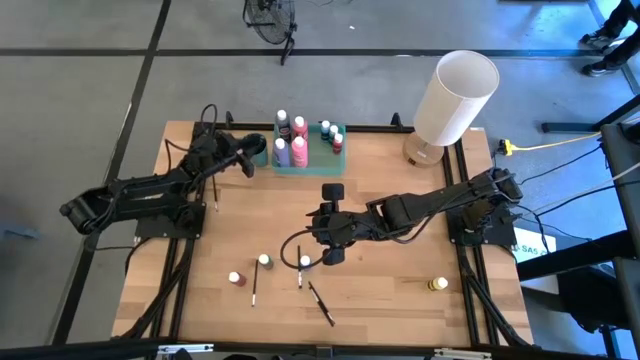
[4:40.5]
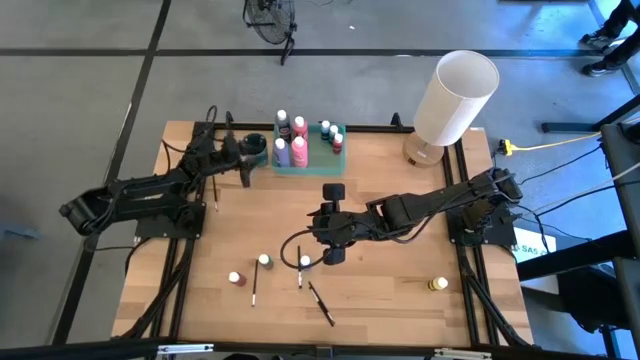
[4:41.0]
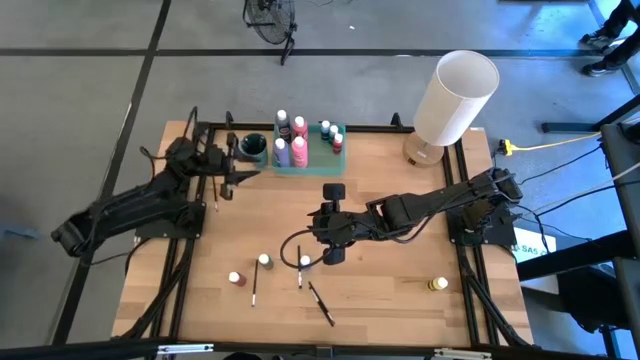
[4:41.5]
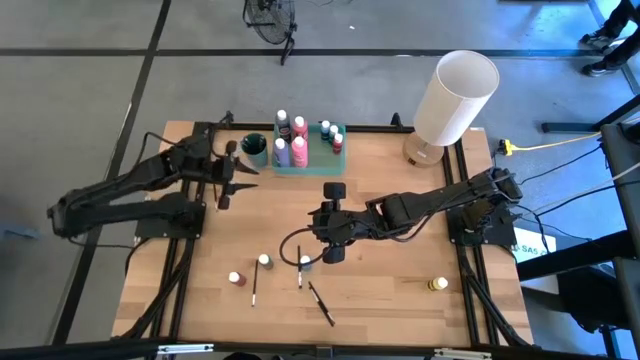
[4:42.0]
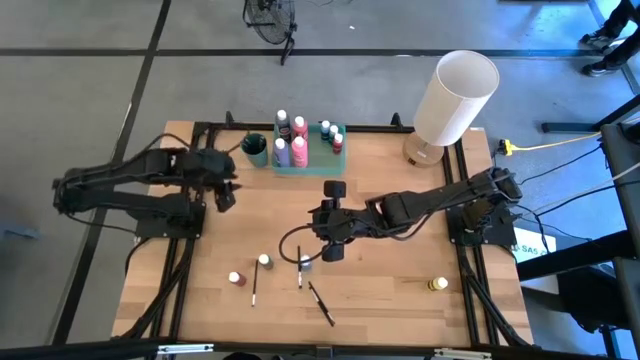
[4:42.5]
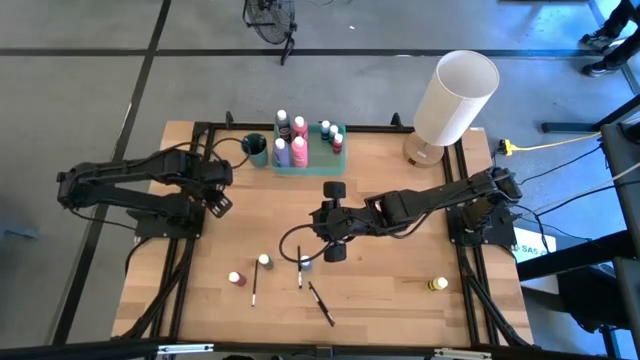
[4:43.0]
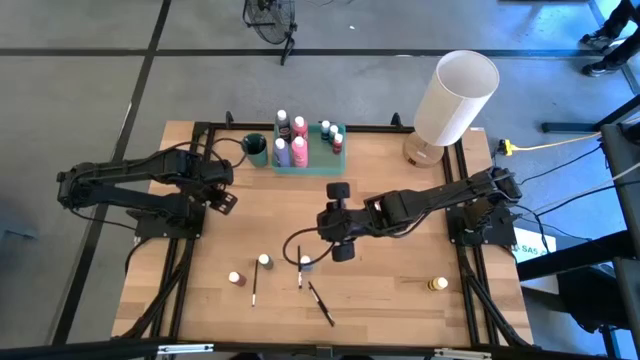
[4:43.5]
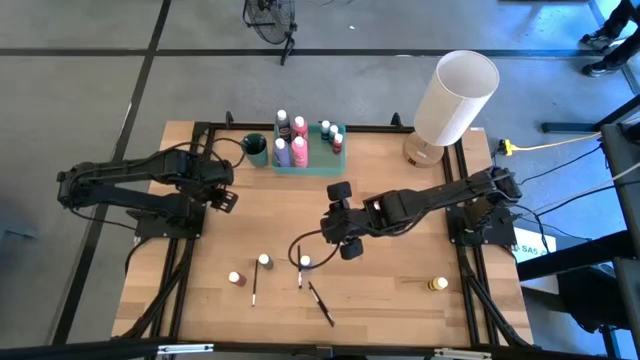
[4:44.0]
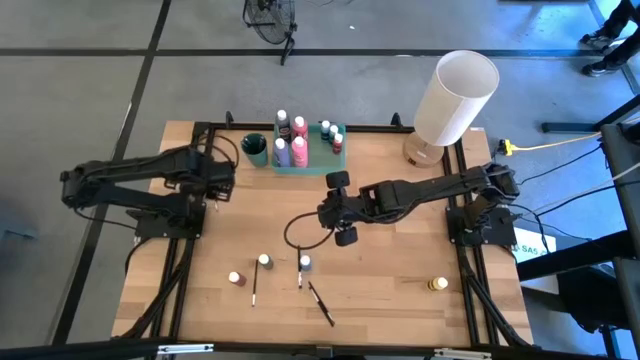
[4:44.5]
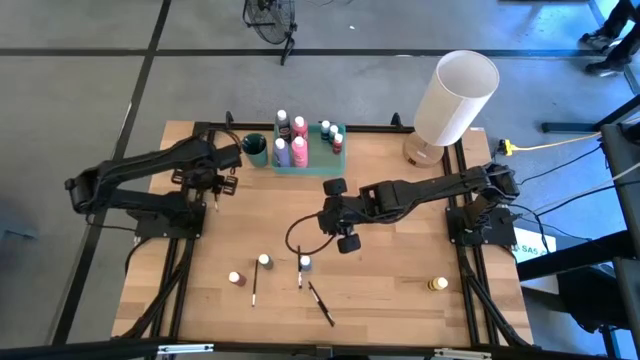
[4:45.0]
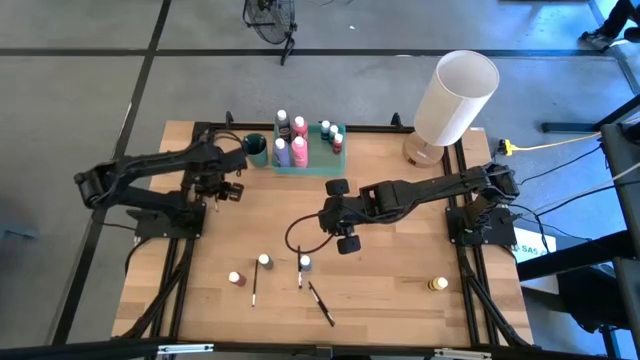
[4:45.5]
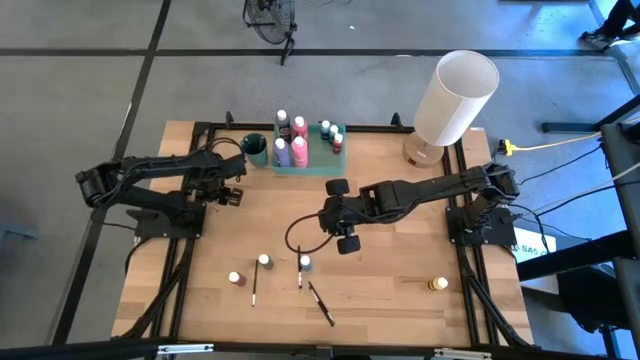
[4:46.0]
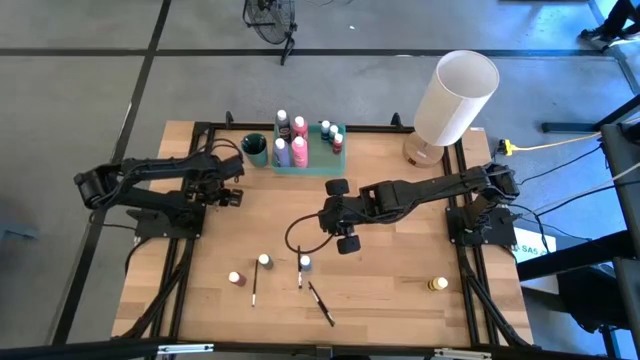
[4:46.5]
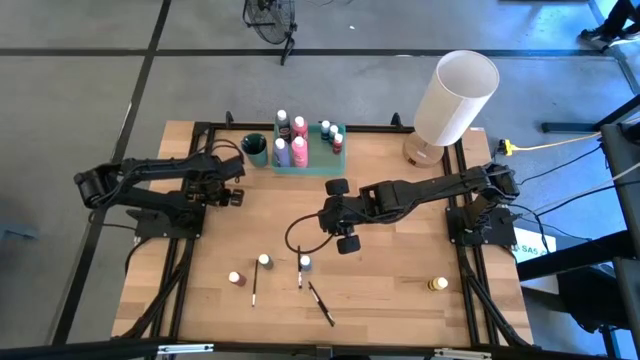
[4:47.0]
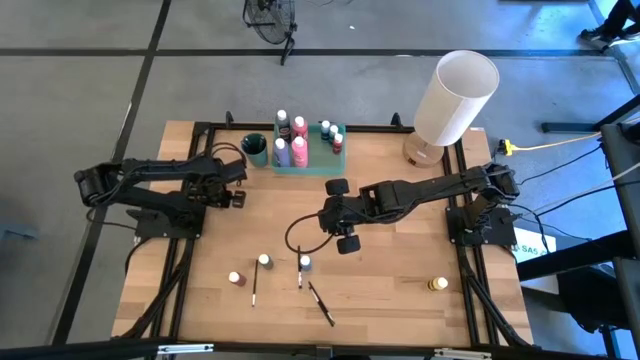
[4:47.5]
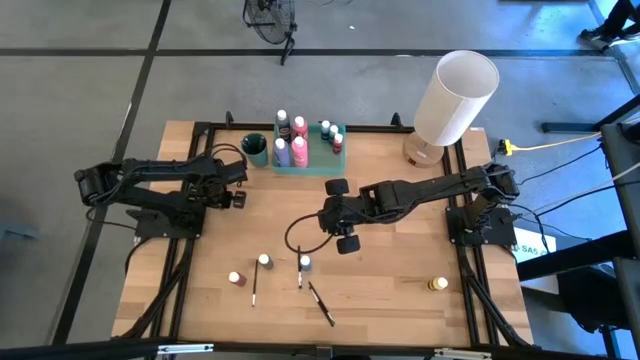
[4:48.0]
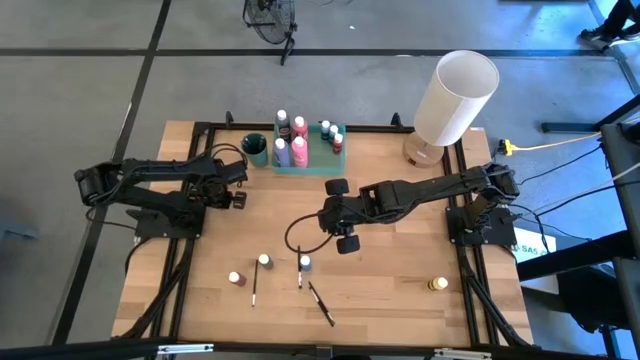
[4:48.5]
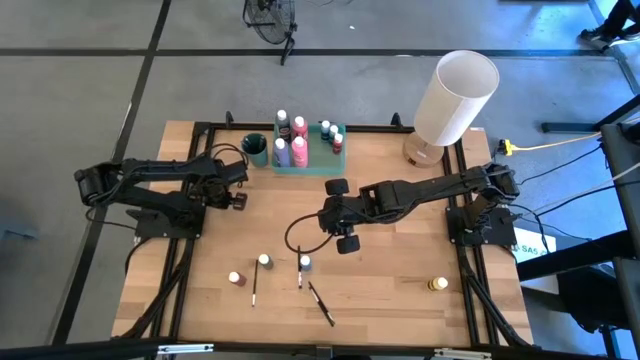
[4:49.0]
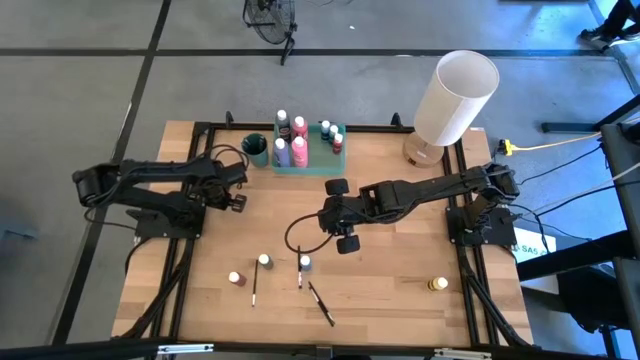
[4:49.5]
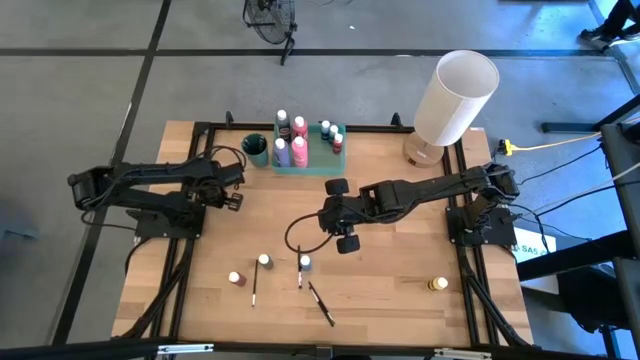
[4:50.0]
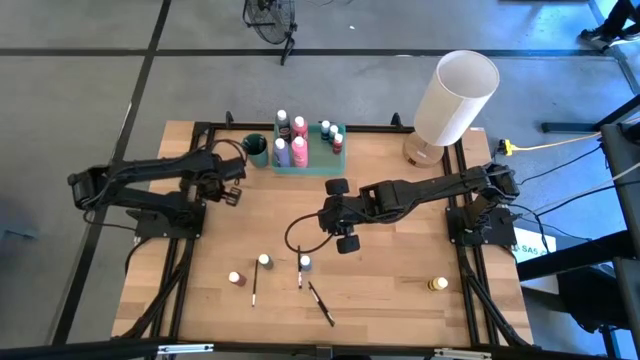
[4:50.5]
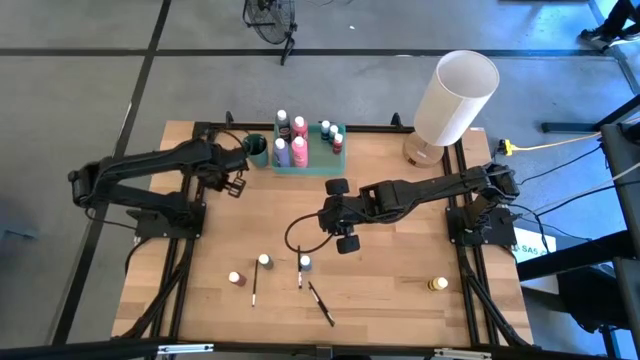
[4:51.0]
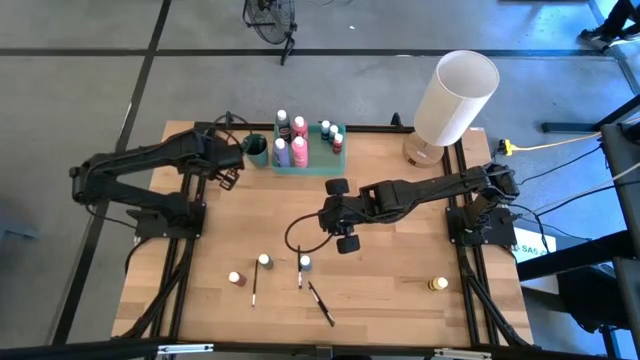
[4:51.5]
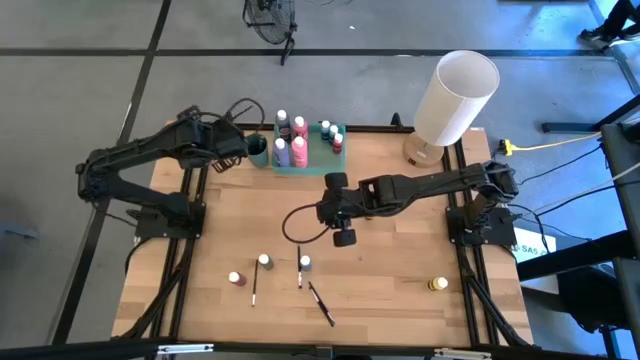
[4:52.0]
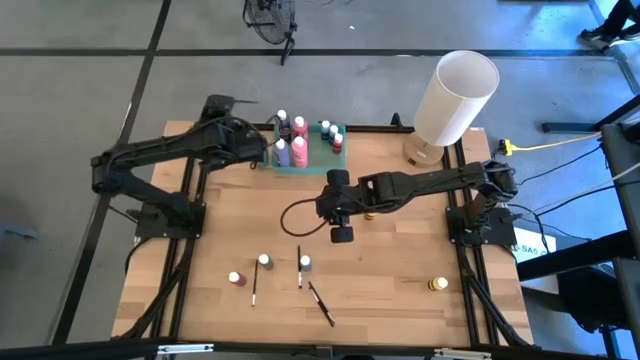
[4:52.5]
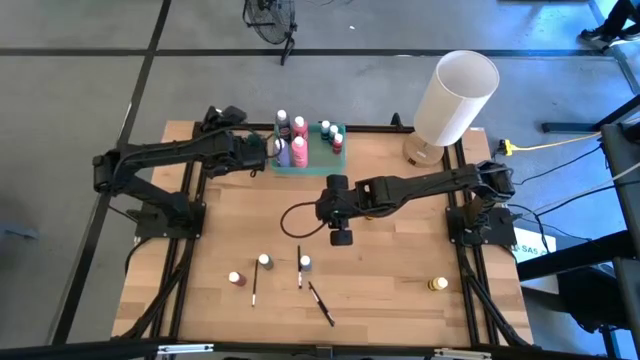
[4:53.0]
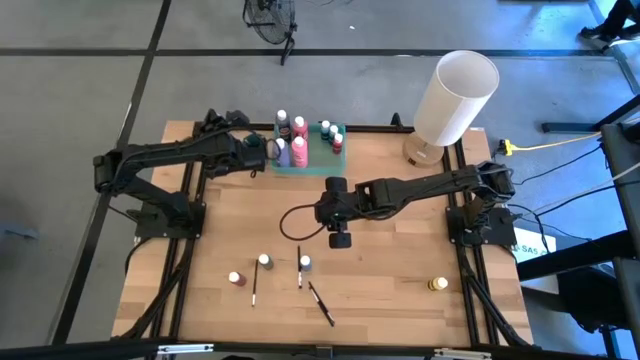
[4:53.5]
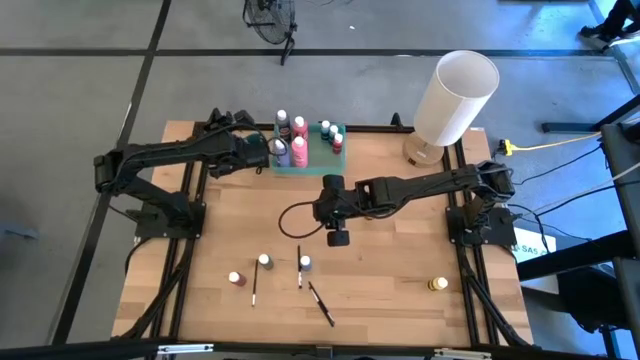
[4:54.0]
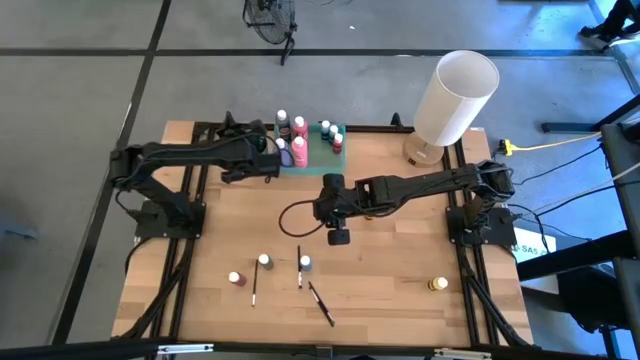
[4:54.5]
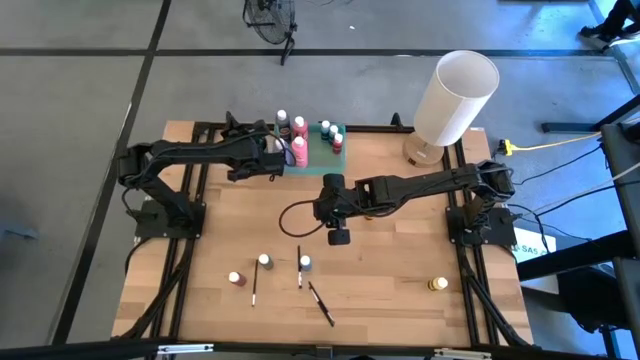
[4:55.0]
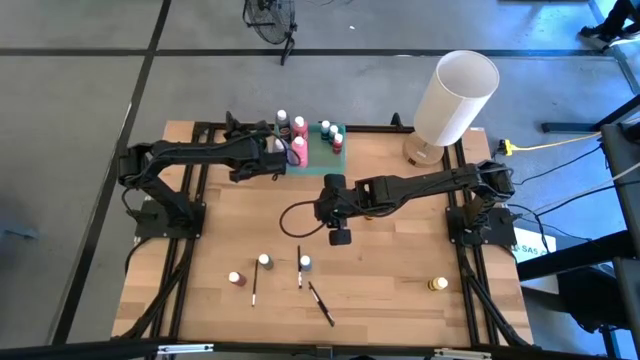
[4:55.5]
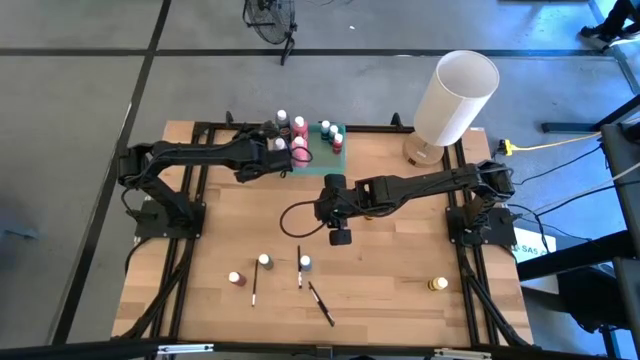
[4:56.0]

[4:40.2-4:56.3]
Task: Pick & Place Paint Supplies
Put the silver paintbrush into the green cup

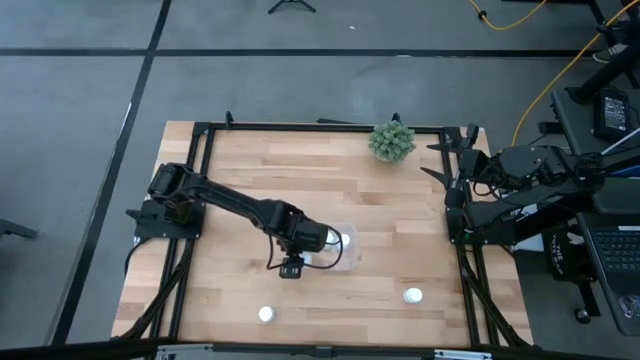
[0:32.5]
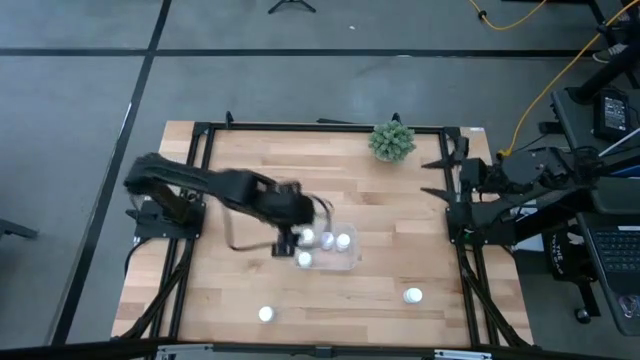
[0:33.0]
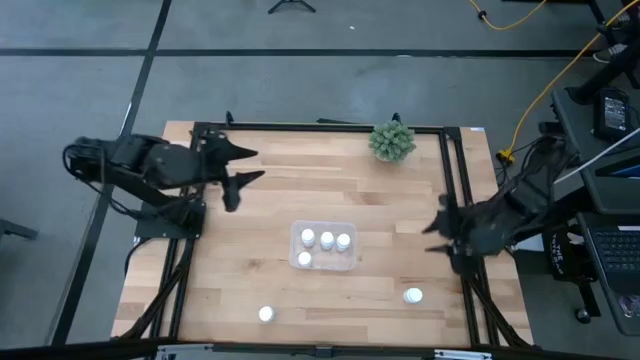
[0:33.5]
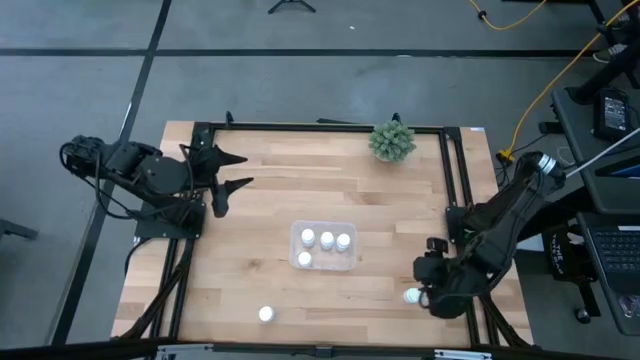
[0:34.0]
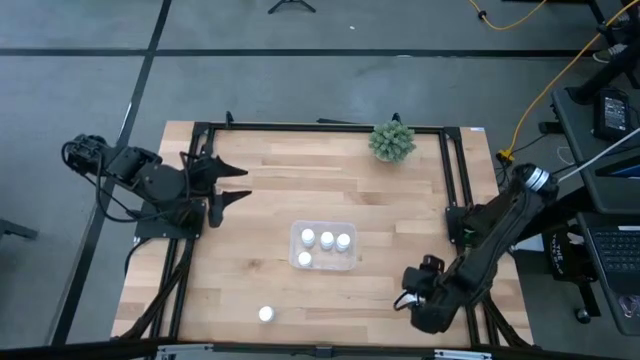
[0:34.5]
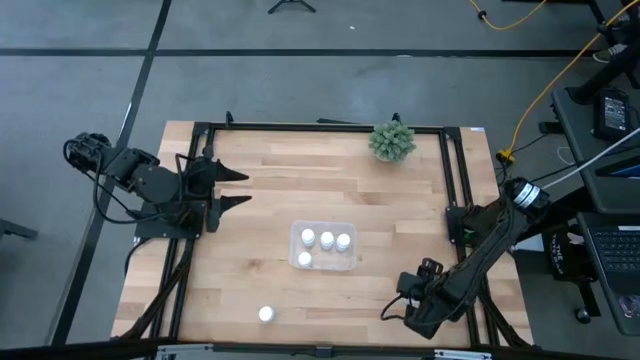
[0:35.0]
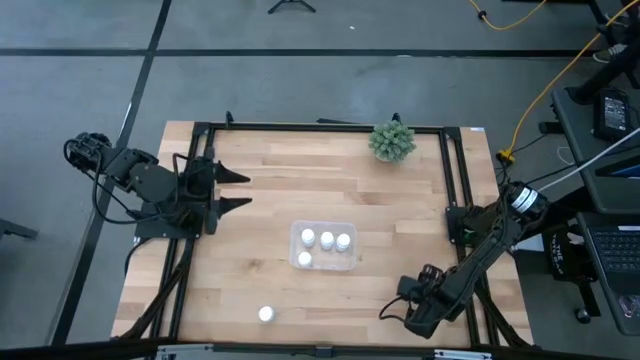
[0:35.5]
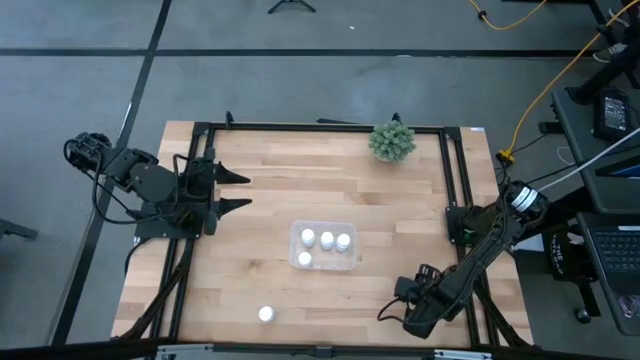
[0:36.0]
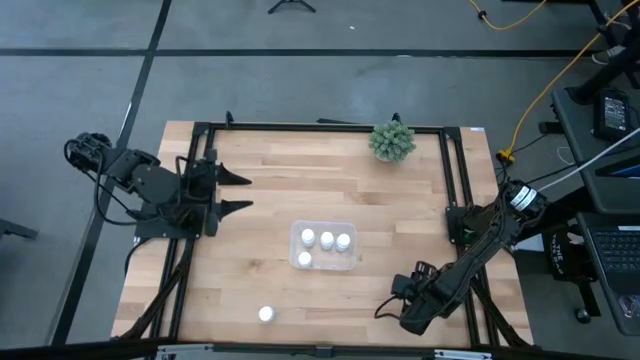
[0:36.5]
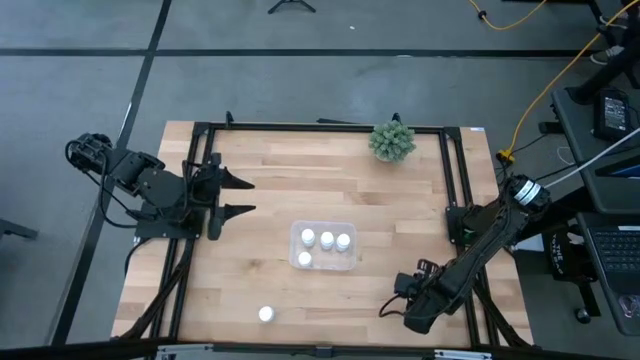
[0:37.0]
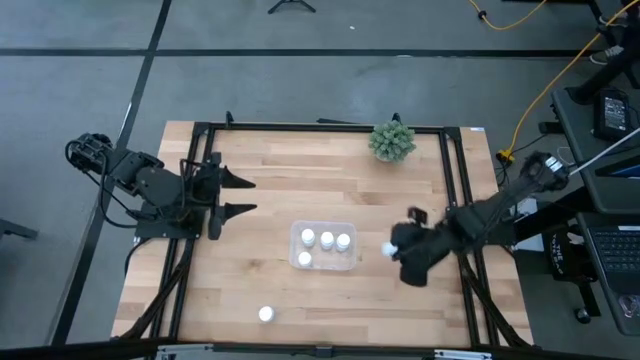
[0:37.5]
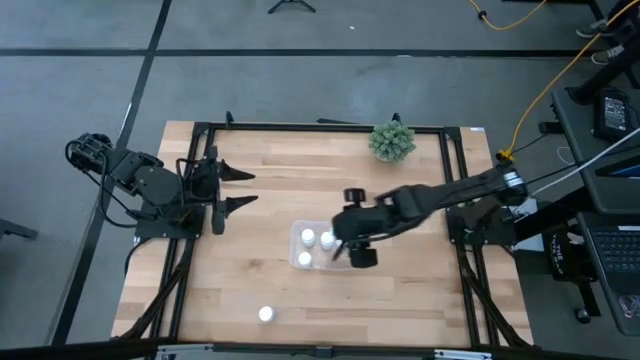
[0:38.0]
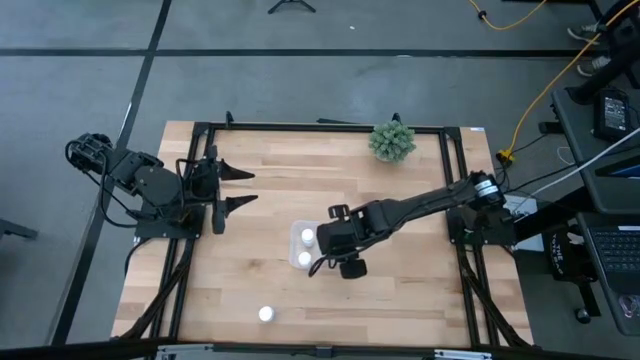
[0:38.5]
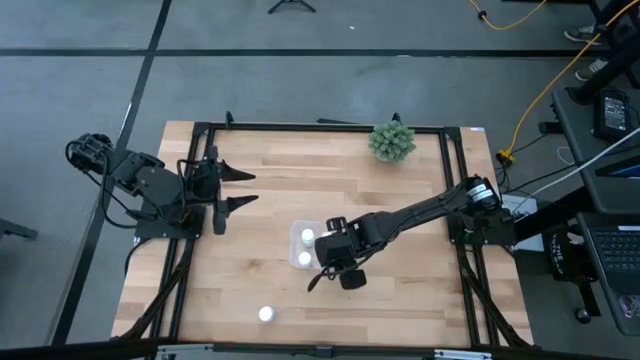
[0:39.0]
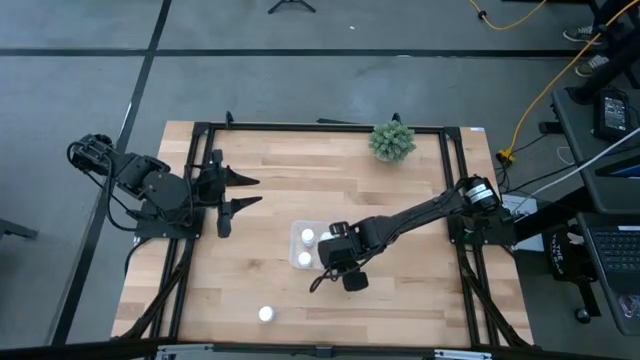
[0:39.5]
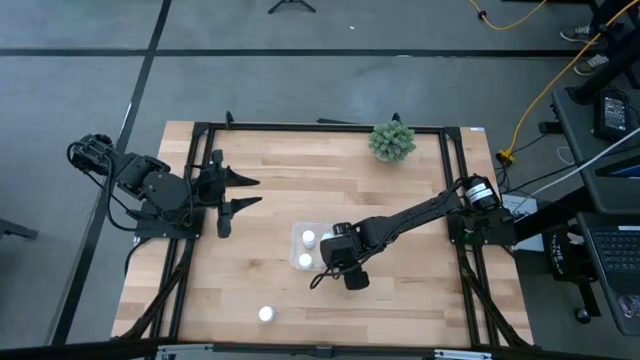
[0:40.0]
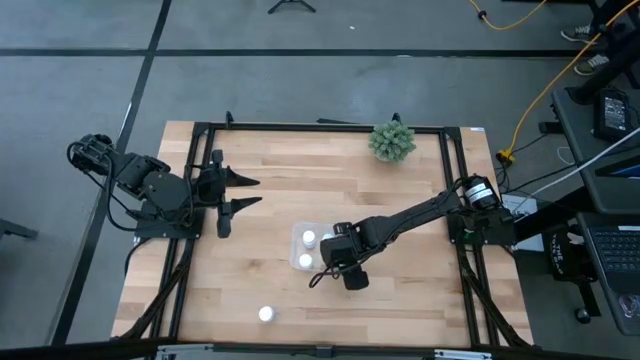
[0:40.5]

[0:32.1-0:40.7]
Task: Pick and place pill bottles into a basket
Put the white pill bottle into the transparent bin
